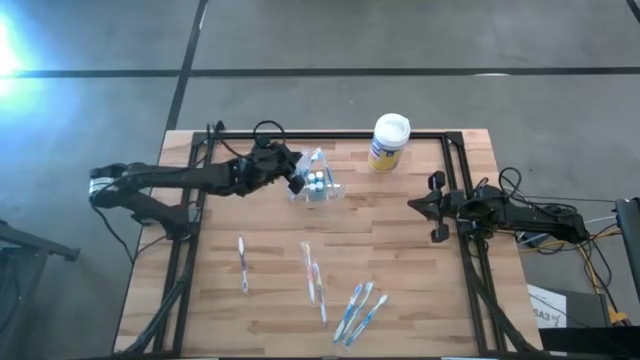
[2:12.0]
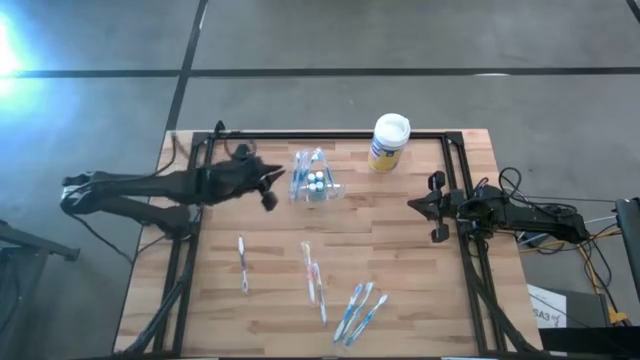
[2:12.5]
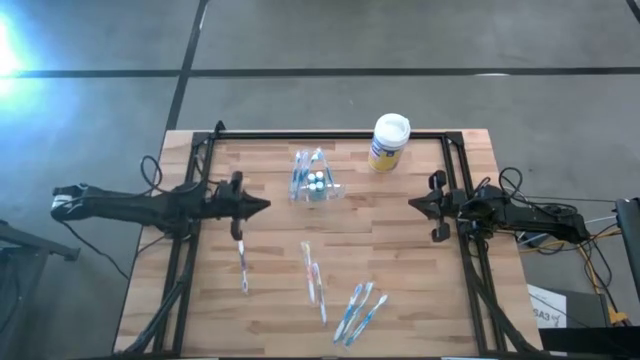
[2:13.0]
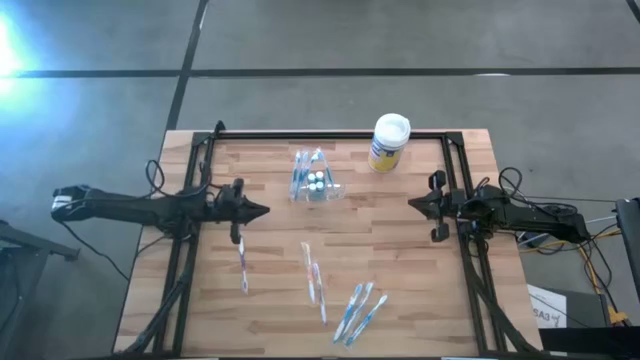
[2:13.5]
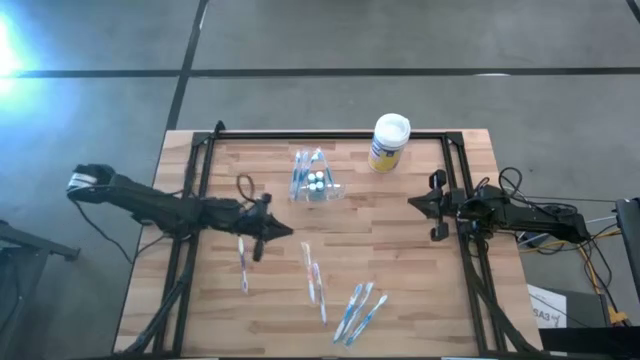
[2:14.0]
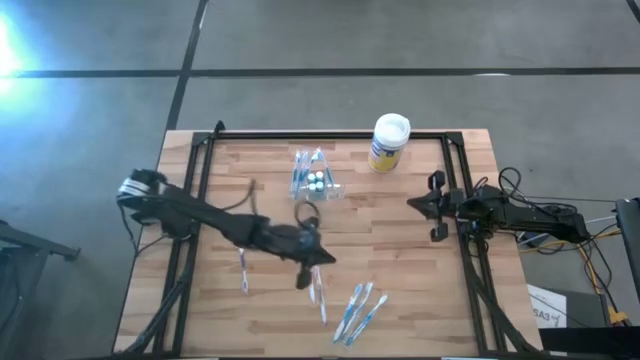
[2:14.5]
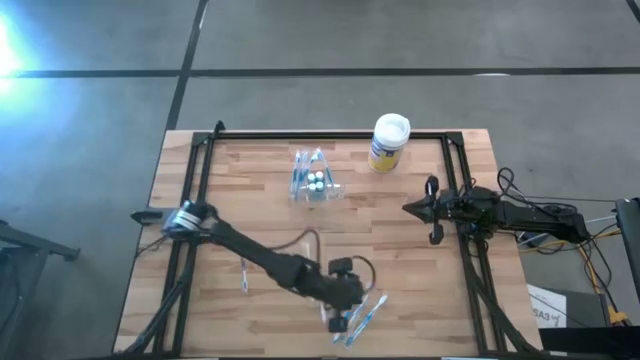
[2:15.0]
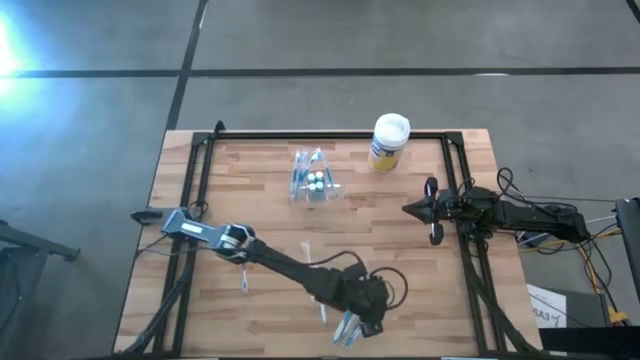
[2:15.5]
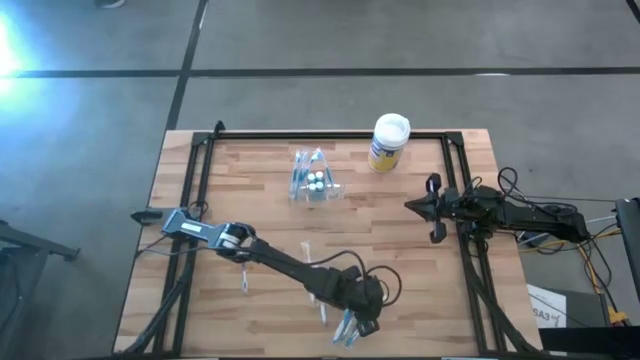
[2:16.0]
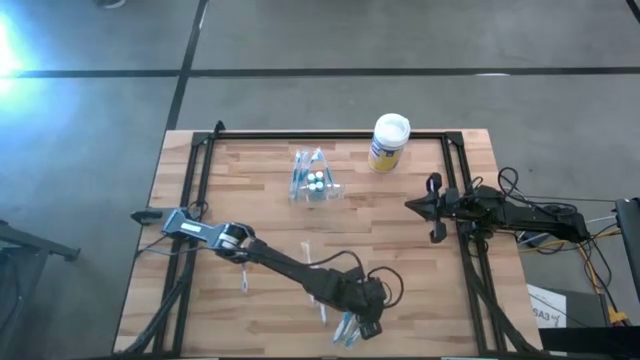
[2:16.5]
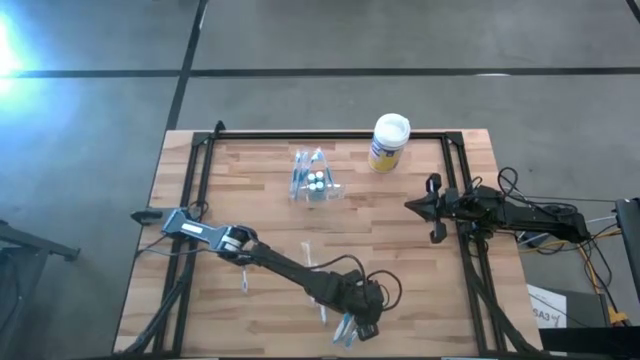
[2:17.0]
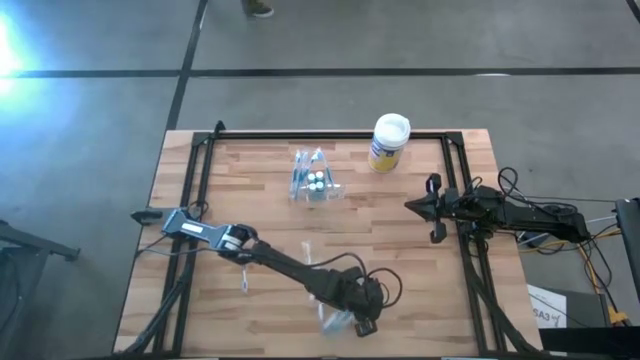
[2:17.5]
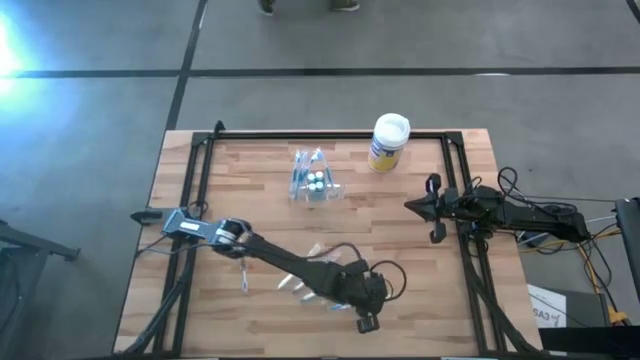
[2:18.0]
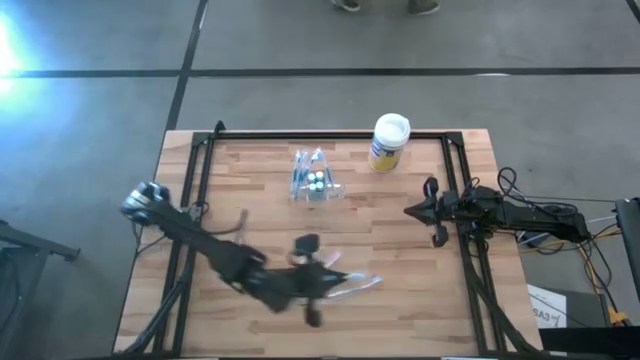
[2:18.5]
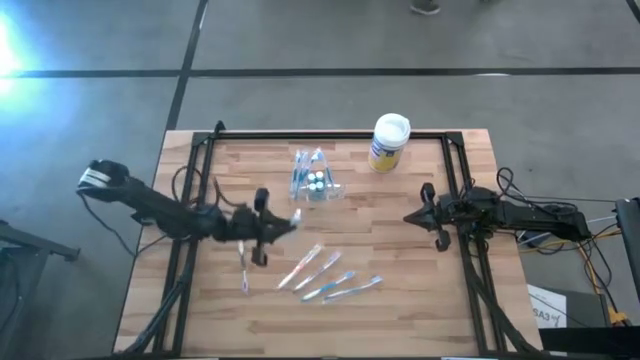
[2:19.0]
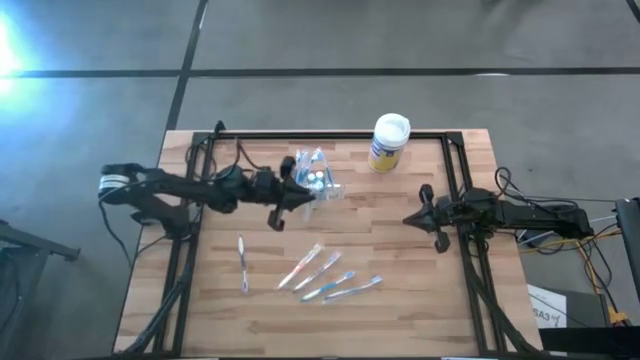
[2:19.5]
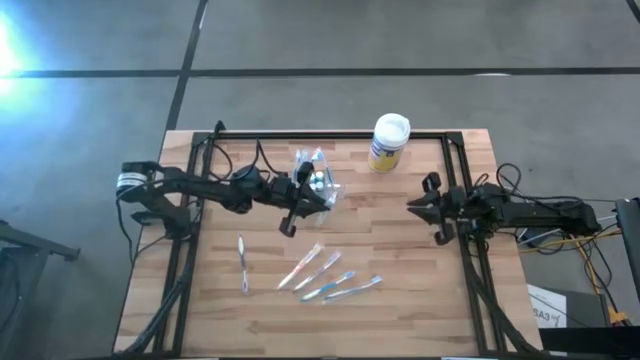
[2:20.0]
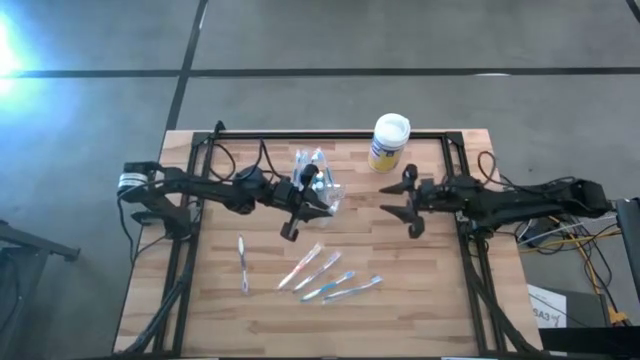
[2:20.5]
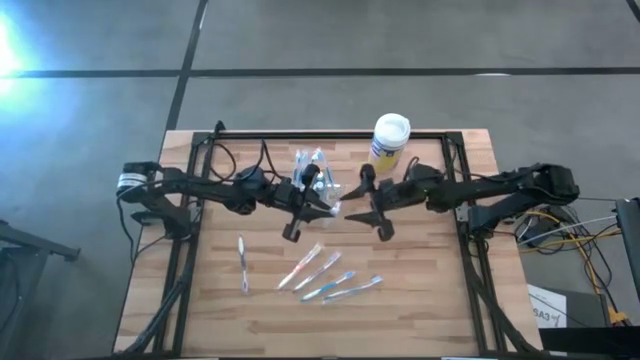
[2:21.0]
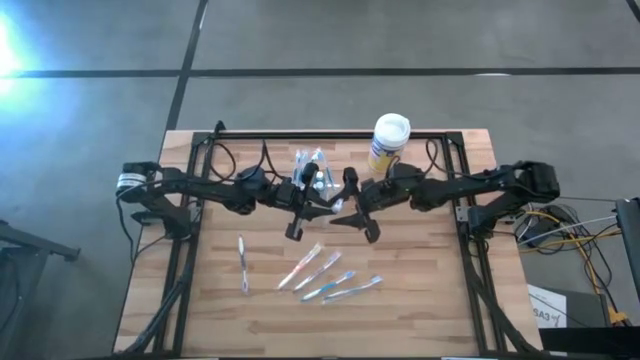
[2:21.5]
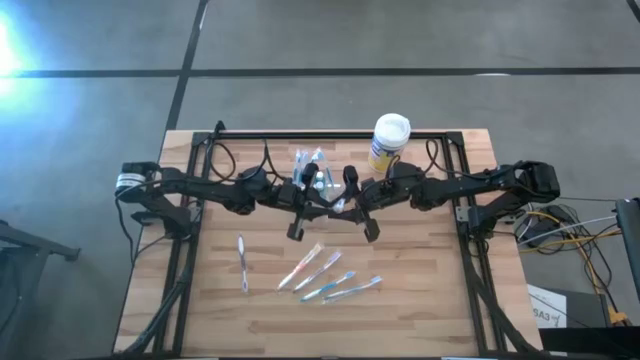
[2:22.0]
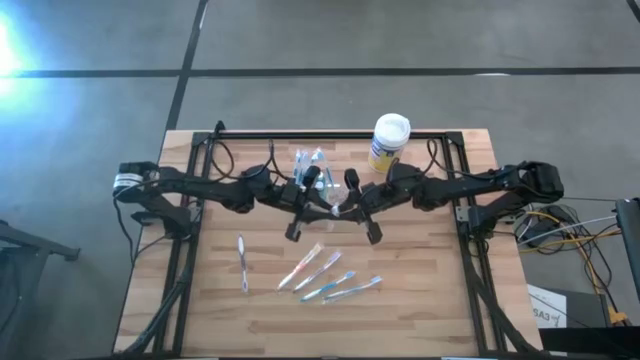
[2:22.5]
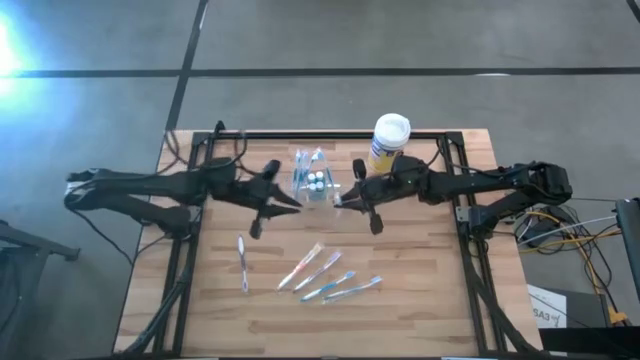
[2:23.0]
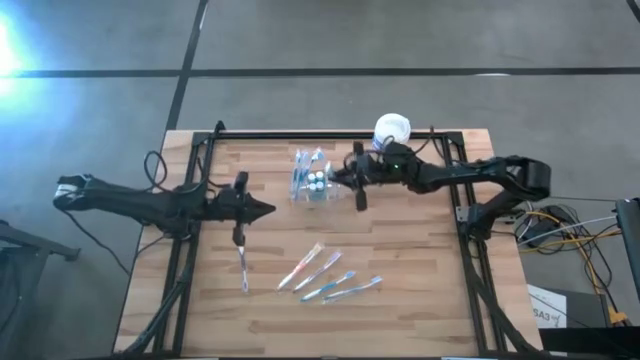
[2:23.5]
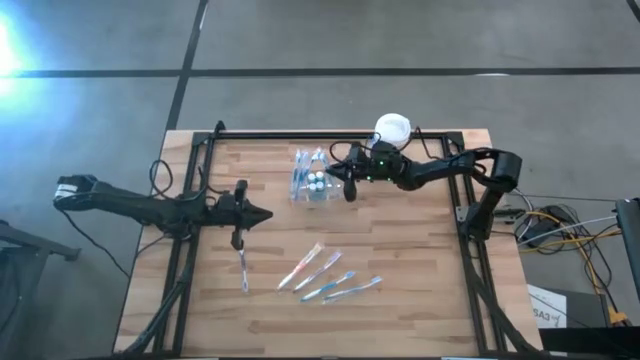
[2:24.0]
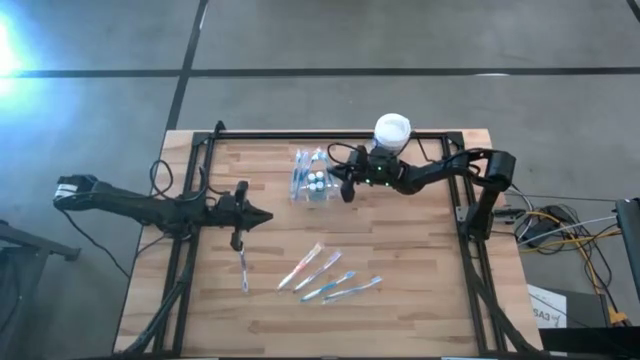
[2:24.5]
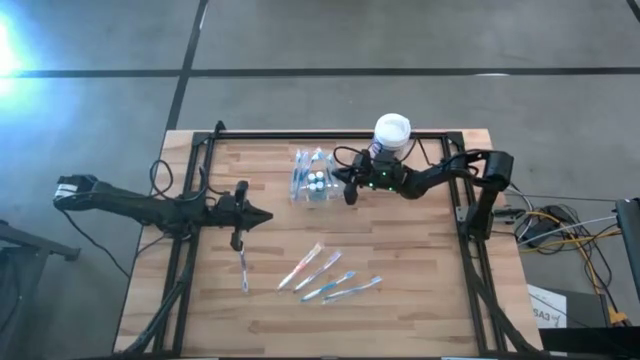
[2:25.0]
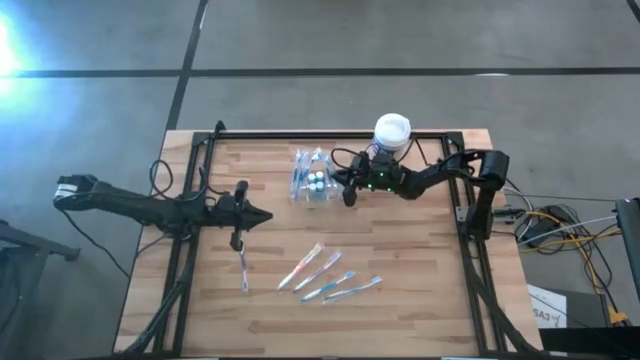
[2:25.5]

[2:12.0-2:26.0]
Task: Pick & Place toothbrushing station
Put the blue toothbrush into the transparent organizer

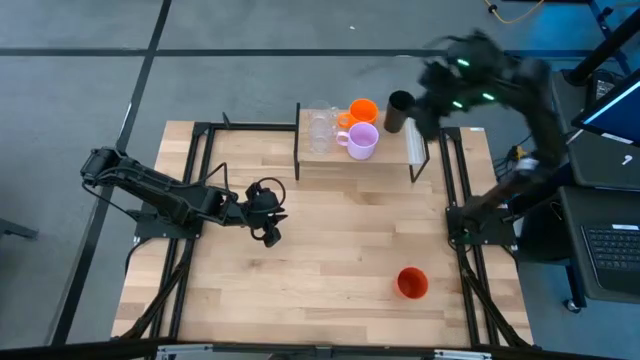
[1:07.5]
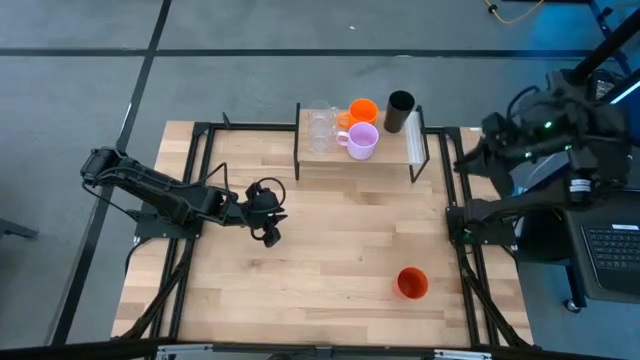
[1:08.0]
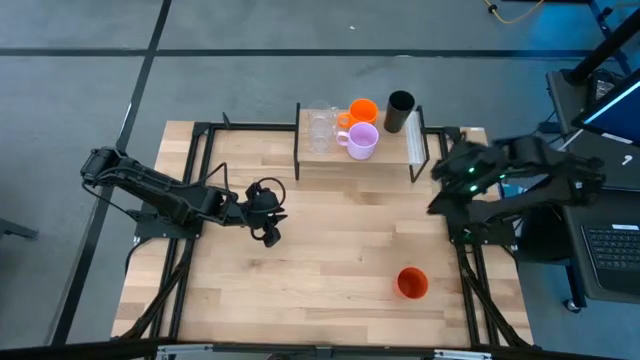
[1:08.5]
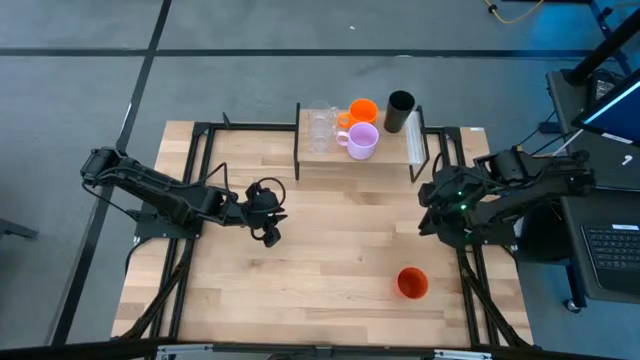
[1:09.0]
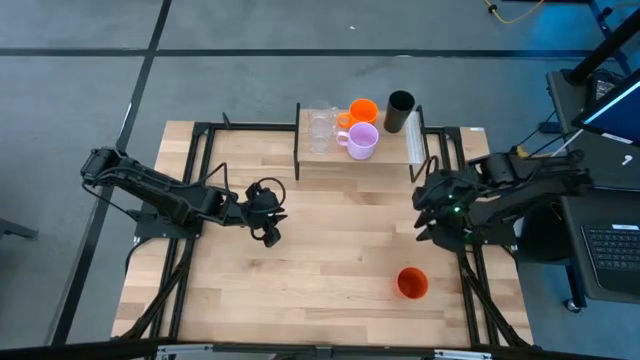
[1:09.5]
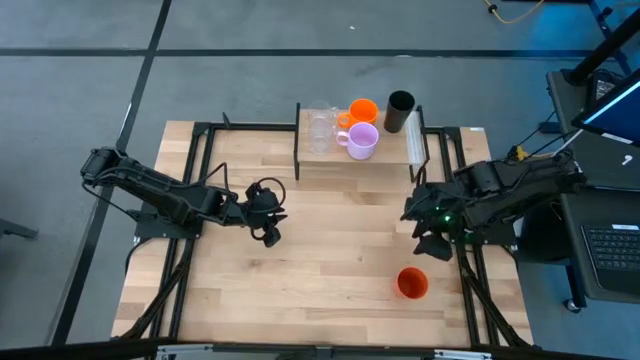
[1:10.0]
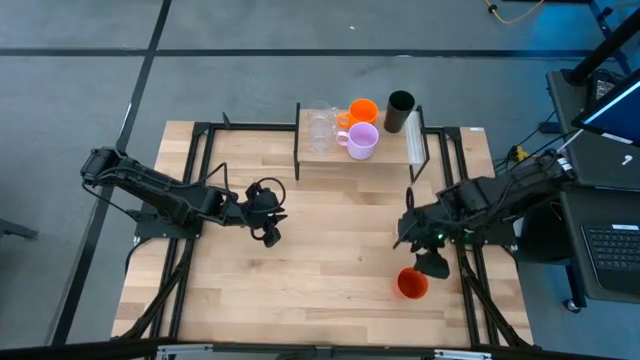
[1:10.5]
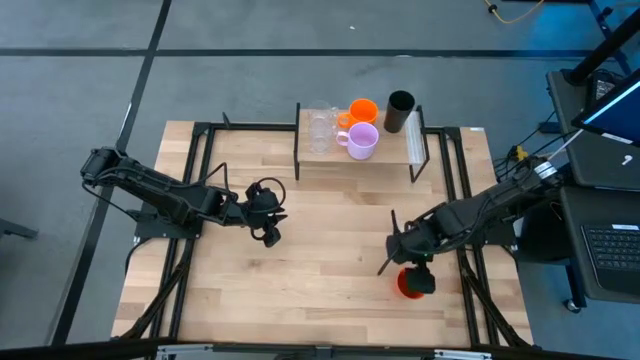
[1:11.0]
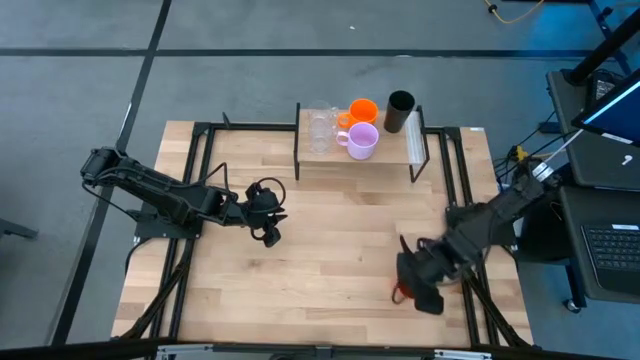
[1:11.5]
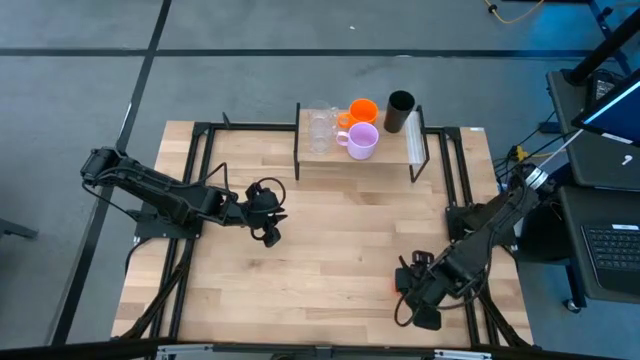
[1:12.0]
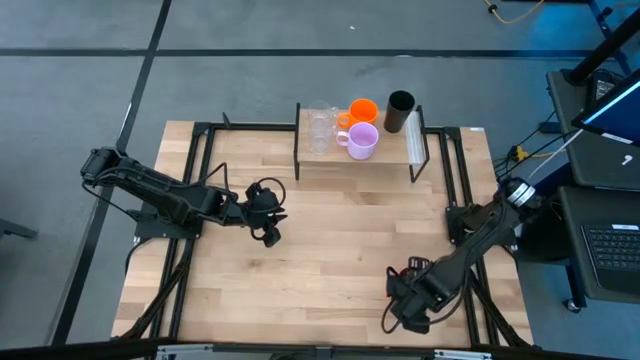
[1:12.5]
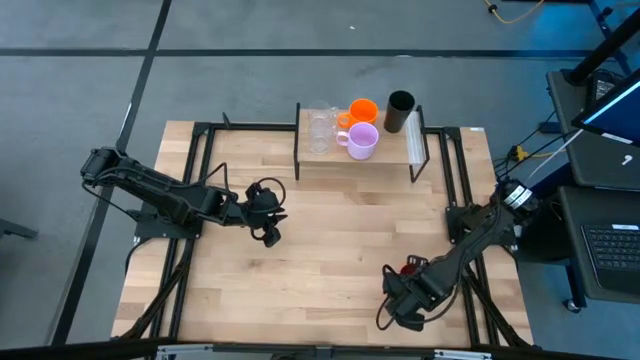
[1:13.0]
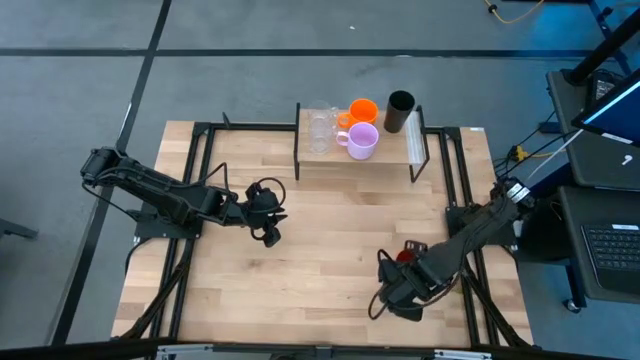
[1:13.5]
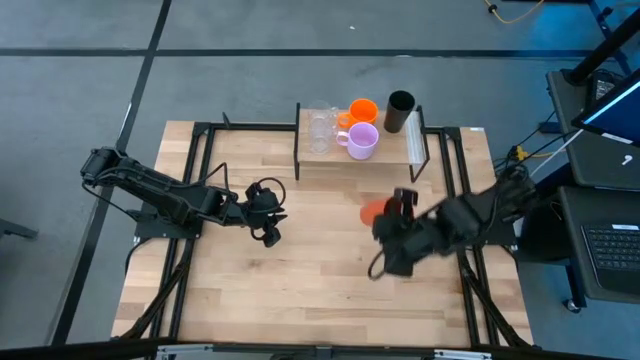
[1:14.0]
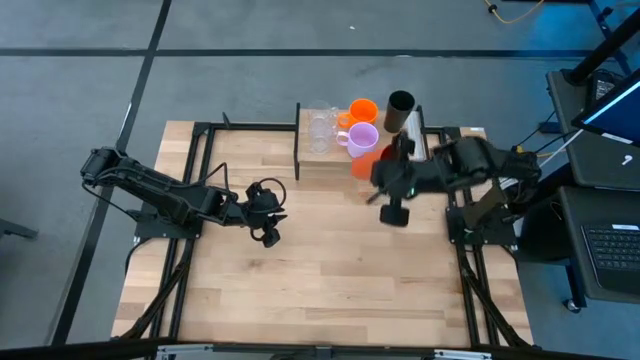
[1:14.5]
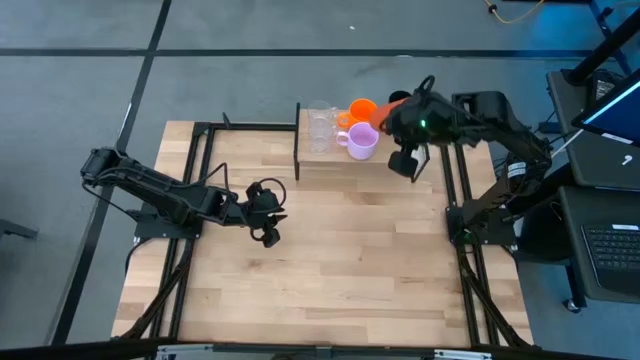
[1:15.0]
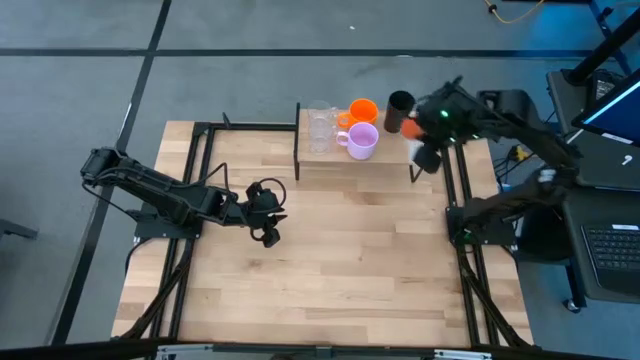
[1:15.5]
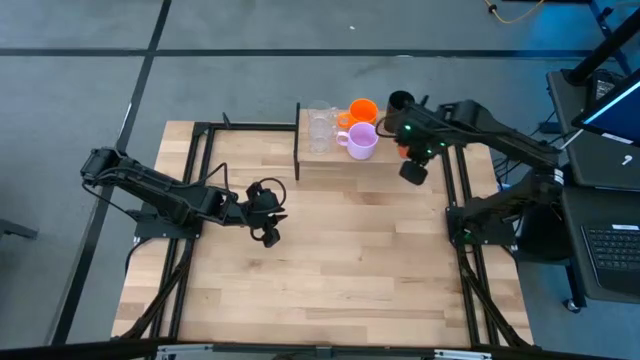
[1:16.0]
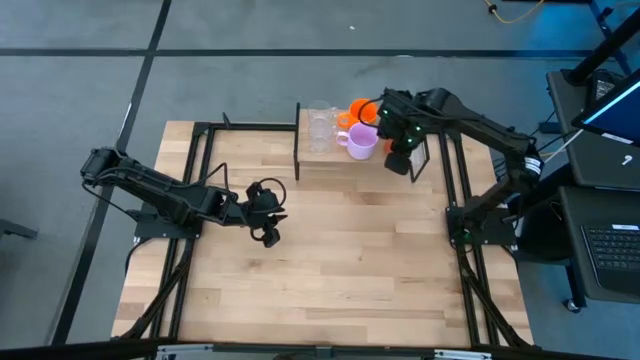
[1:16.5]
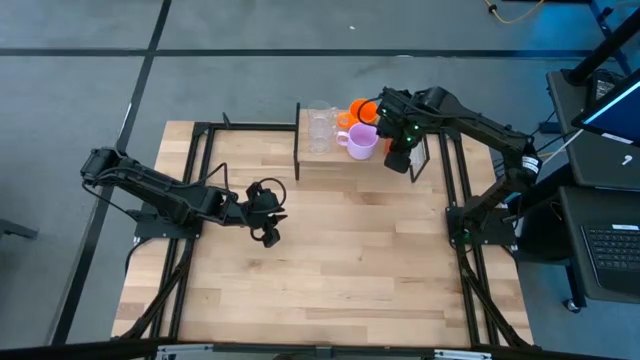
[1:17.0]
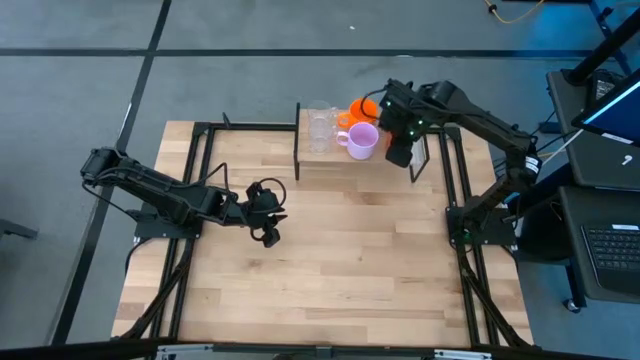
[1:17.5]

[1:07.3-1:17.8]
Task: Stack small to large cups/mugs on shelf
Put the orange cup on the shelf
